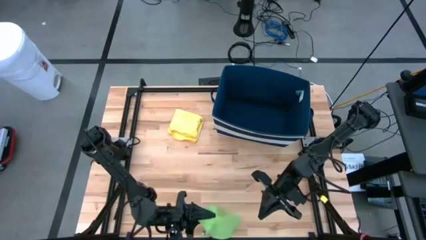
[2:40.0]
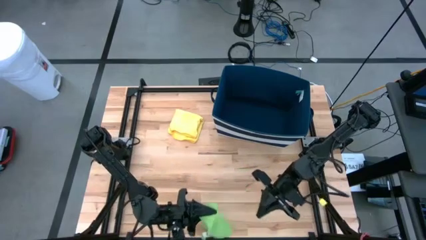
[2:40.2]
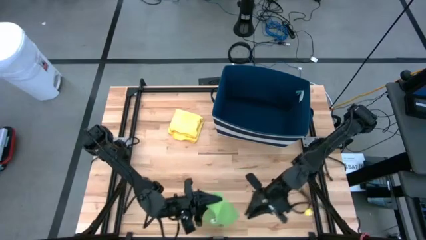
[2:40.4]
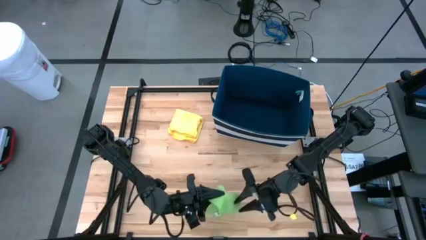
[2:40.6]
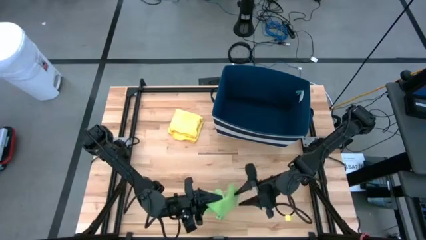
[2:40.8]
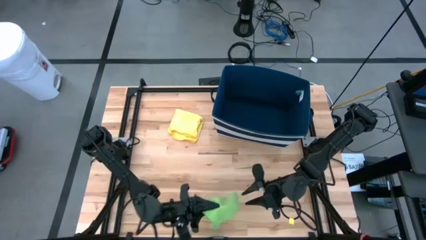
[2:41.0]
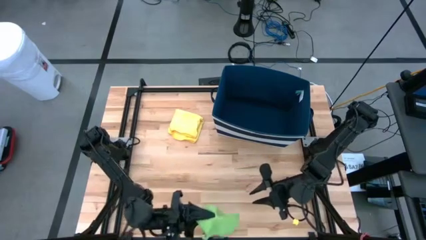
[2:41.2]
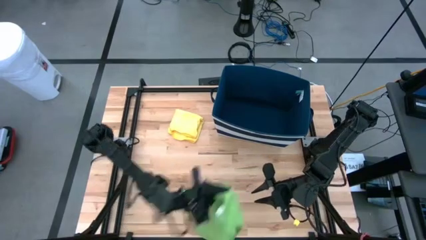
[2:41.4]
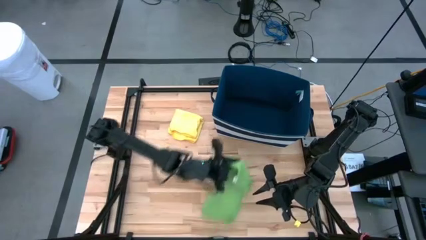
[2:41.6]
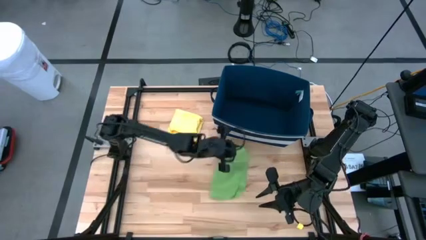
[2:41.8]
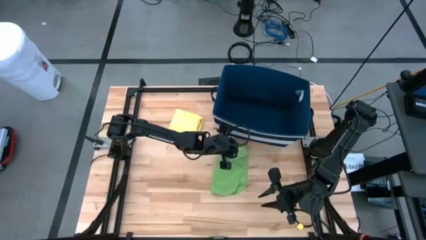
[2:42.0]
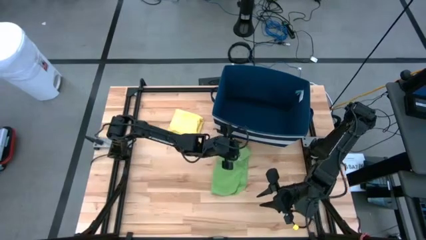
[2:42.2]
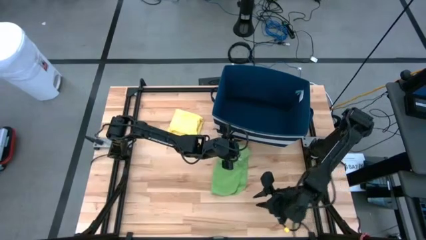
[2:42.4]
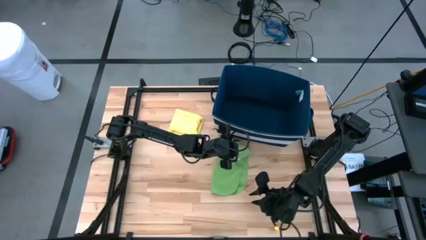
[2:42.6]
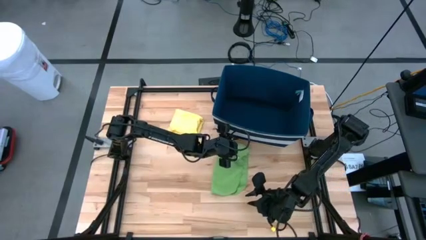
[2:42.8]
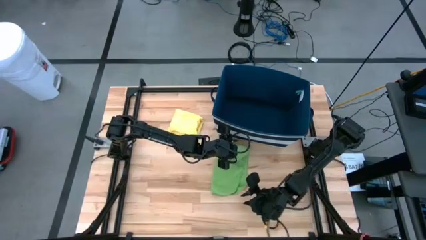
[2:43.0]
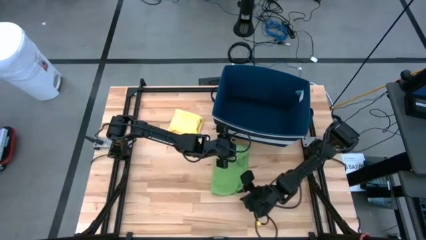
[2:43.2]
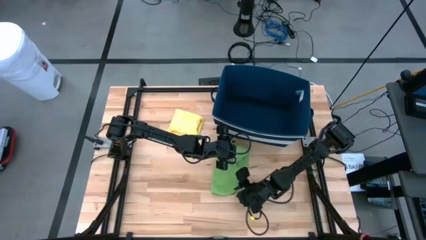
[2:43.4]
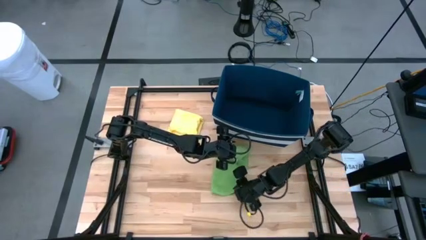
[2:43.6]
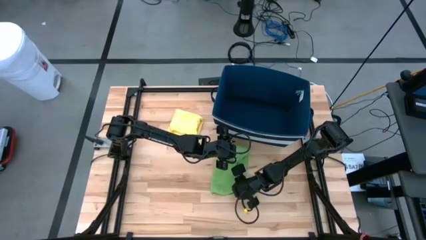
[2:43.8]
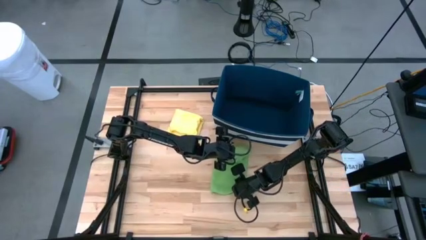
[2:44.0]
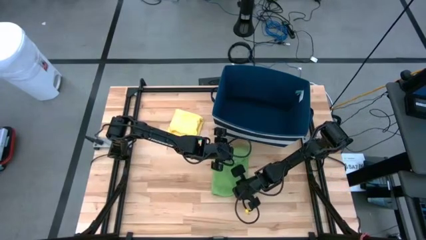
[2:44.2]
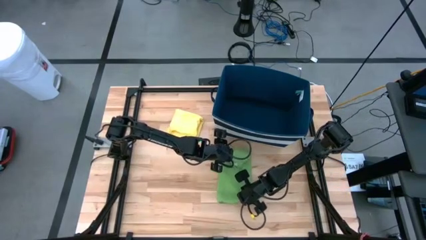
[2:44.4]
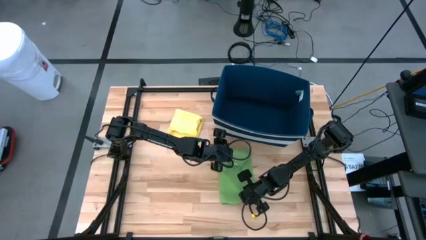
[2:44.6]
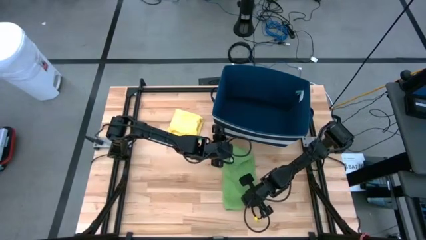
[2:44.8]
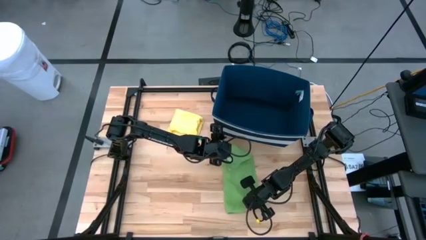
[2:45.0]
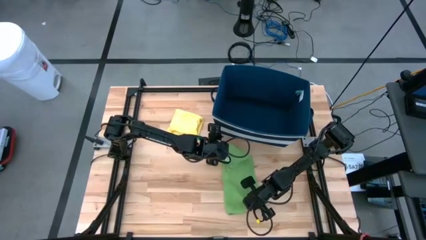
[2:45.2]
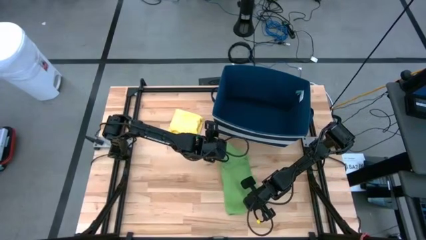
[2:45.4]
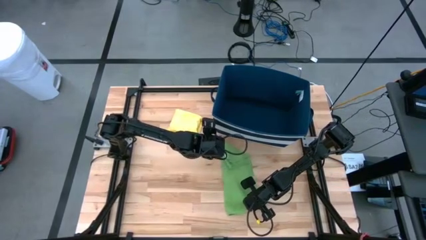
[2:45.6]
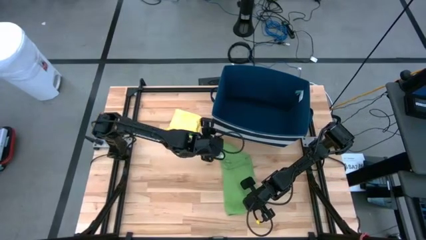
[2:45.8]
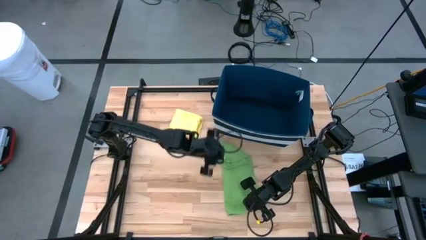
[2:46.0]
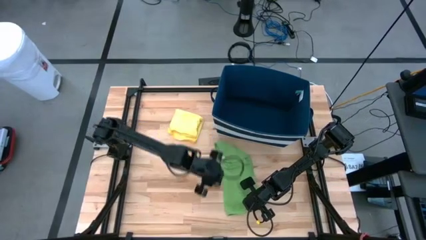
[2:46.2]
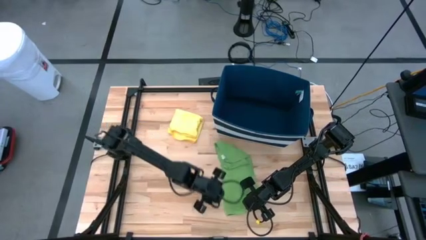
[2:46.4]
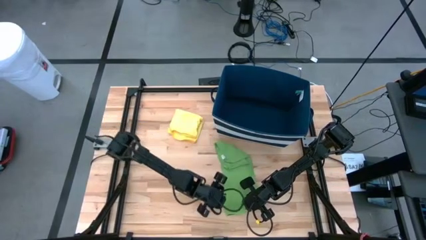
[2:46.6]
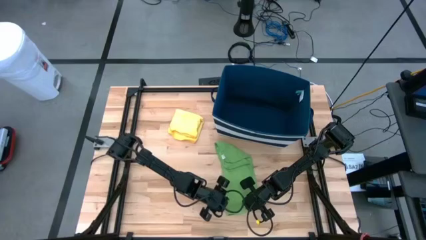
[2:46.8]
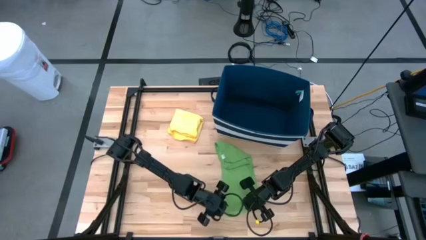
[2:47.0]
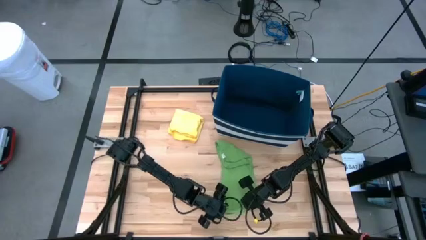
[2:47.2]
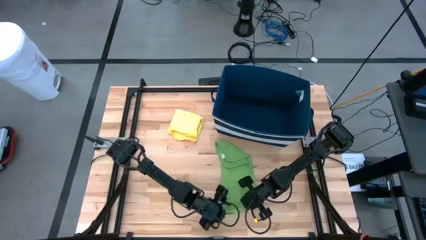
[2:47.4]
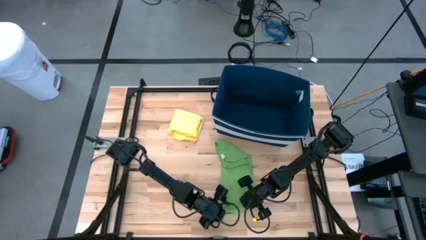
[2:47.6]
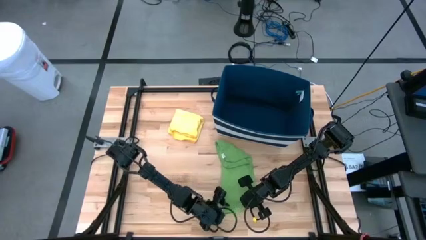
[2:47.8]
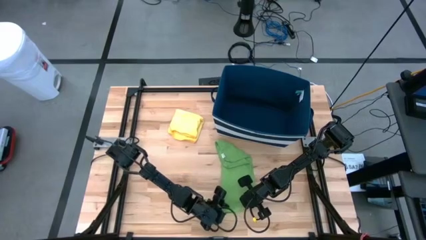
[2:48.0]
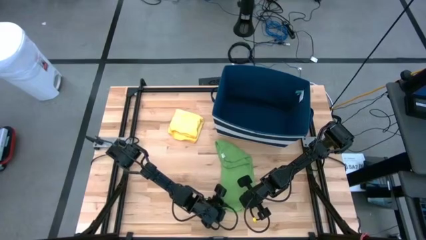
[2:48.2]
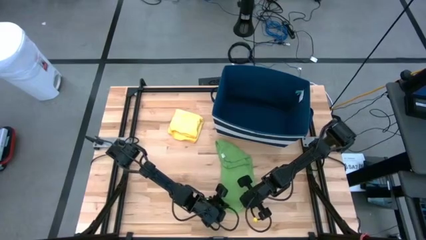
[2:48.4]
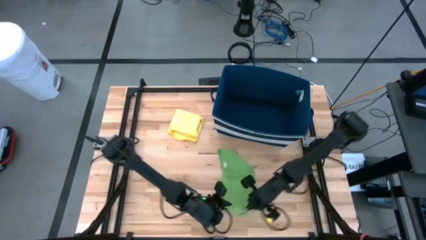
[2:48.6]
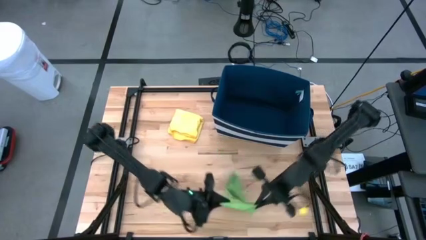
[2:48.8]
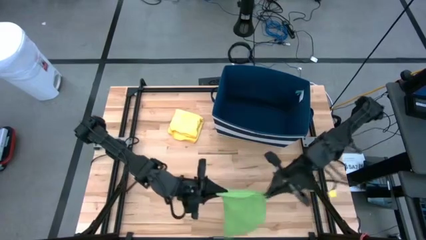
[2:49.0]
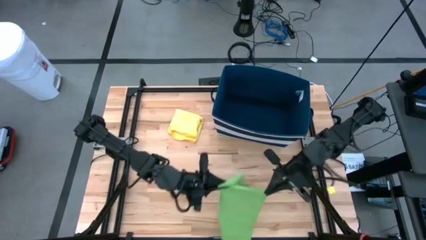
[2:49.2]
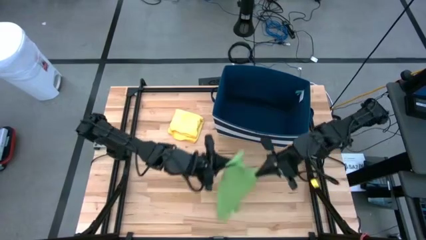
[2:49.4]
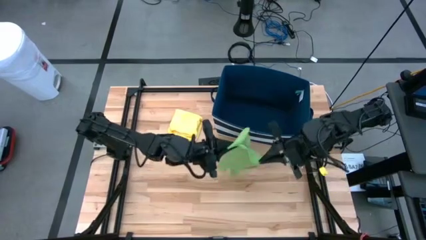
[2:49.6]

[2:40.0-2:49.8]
Task: Fold towel
Fold the green towel

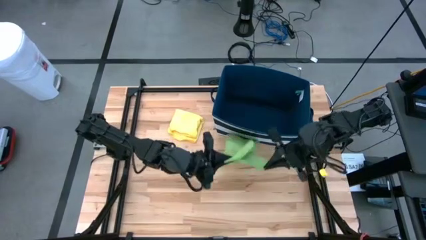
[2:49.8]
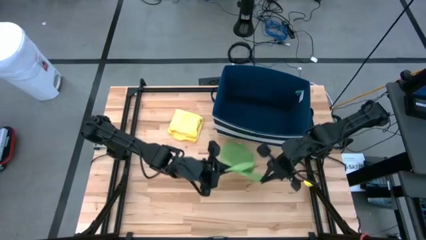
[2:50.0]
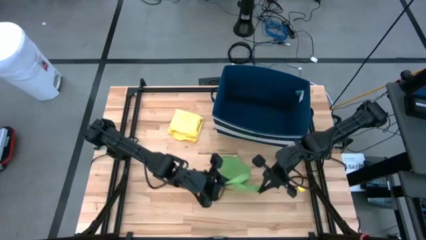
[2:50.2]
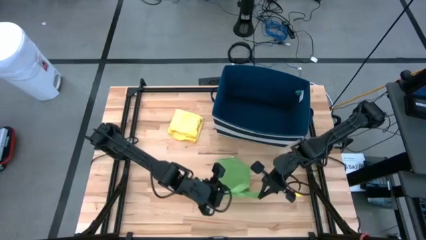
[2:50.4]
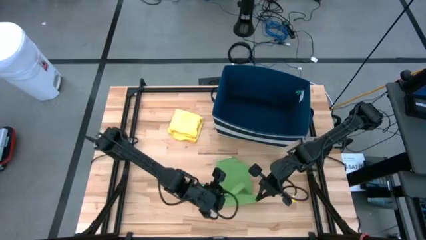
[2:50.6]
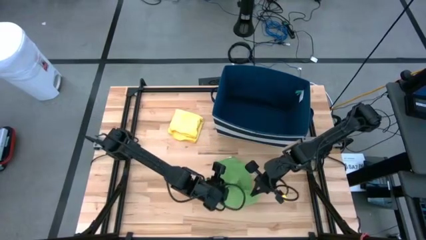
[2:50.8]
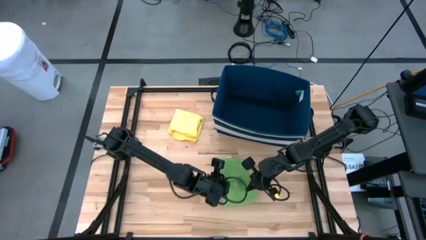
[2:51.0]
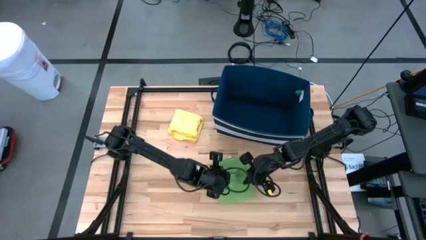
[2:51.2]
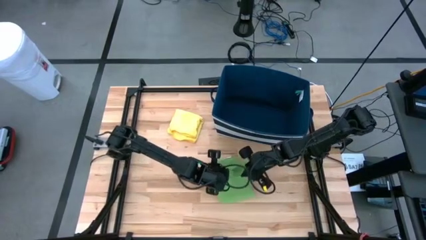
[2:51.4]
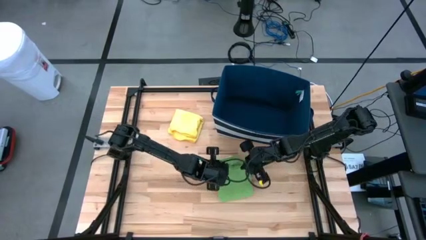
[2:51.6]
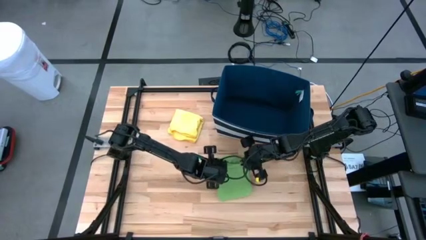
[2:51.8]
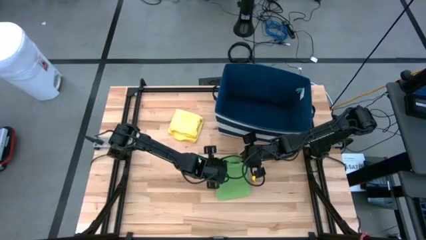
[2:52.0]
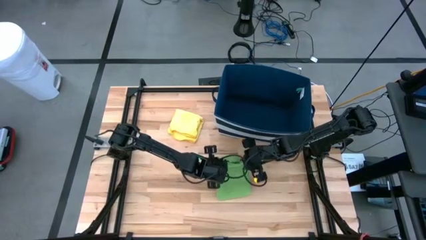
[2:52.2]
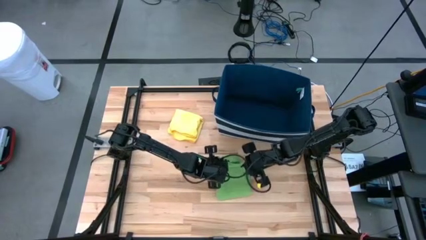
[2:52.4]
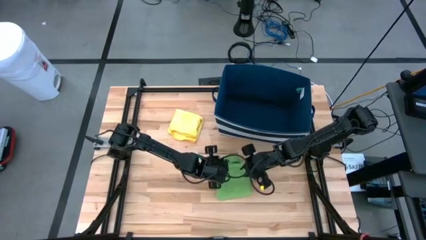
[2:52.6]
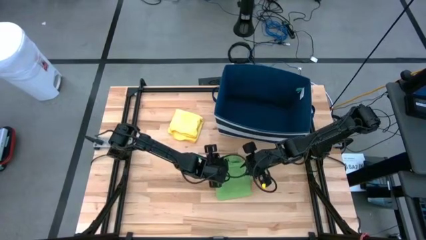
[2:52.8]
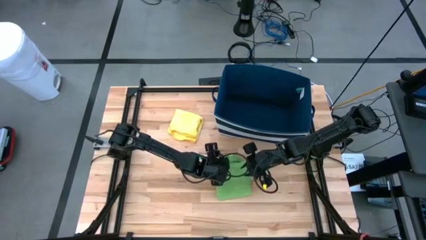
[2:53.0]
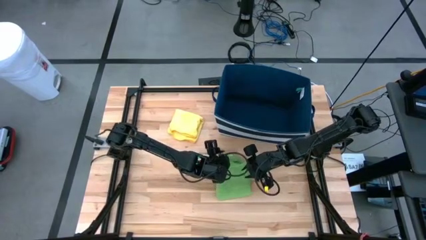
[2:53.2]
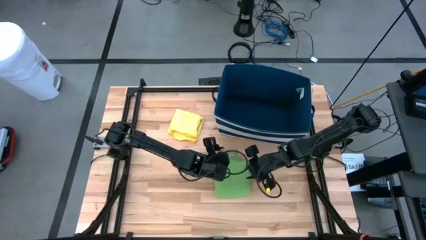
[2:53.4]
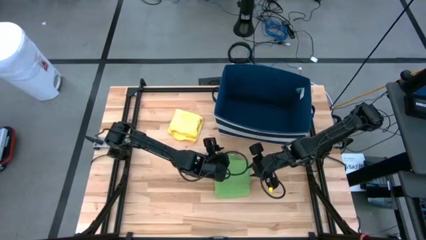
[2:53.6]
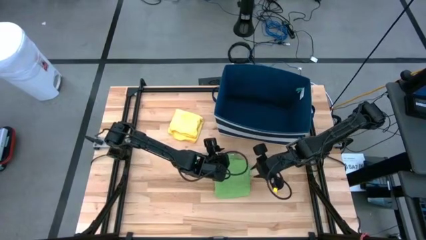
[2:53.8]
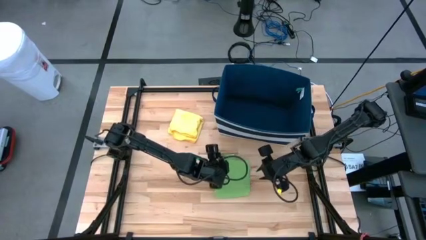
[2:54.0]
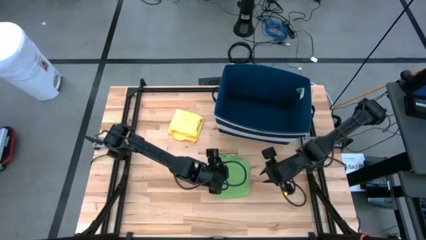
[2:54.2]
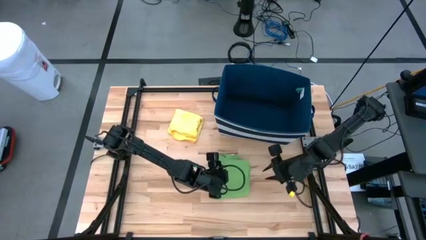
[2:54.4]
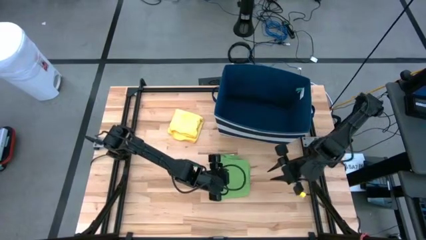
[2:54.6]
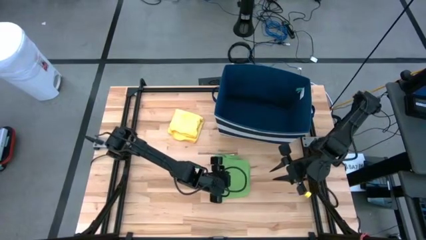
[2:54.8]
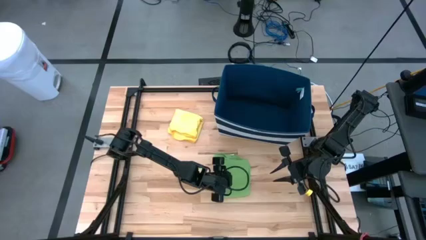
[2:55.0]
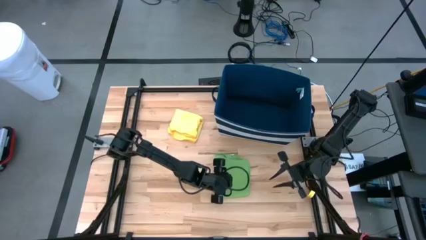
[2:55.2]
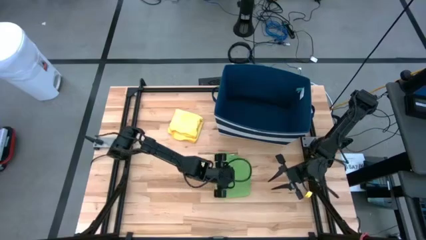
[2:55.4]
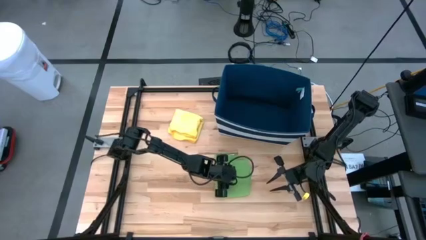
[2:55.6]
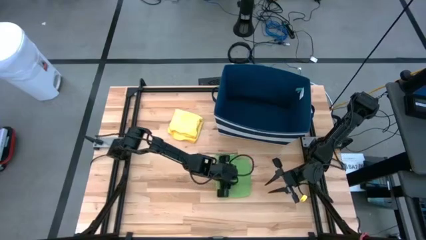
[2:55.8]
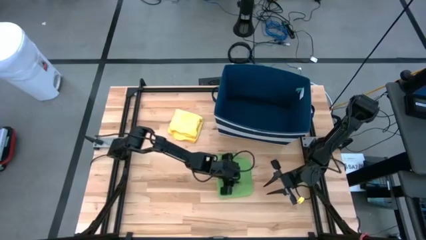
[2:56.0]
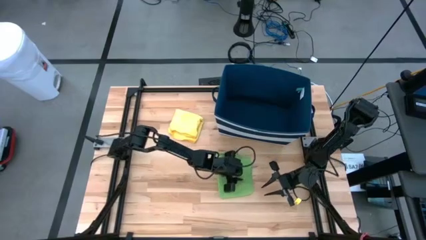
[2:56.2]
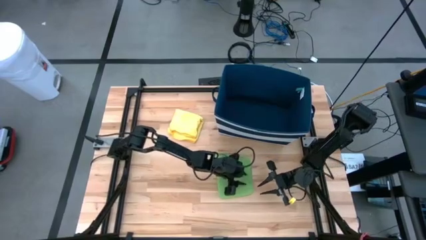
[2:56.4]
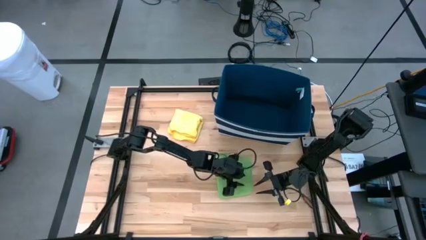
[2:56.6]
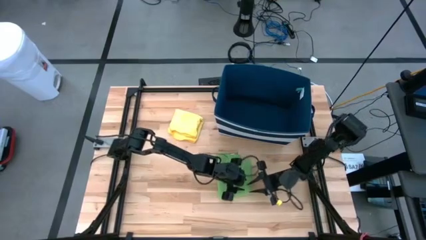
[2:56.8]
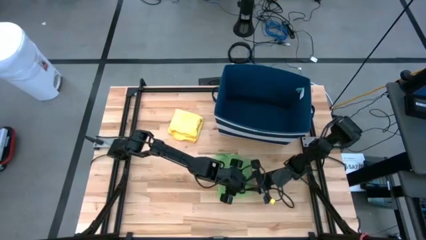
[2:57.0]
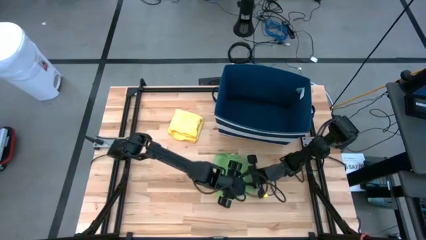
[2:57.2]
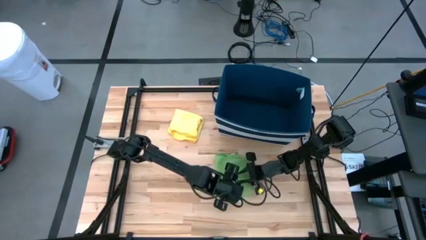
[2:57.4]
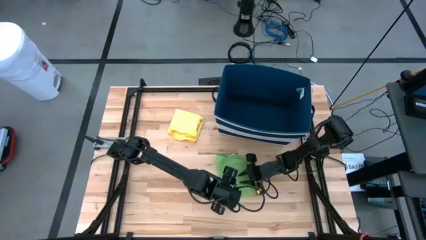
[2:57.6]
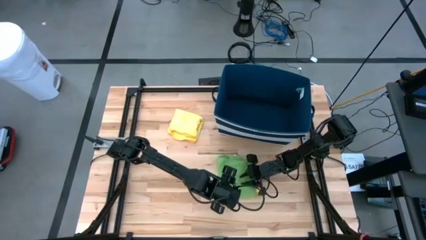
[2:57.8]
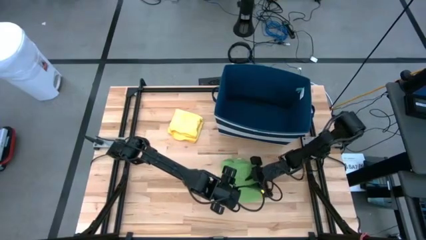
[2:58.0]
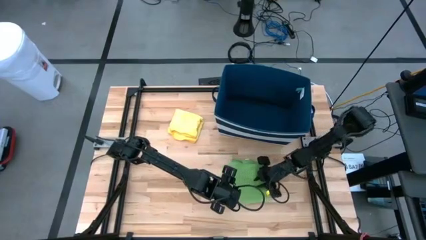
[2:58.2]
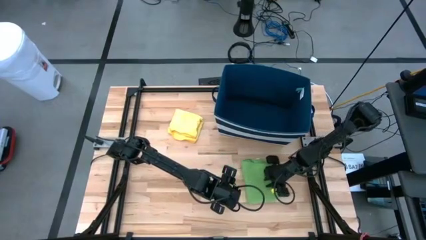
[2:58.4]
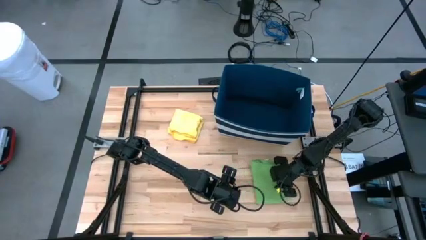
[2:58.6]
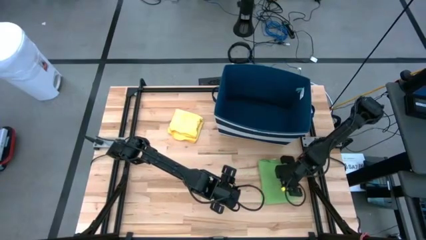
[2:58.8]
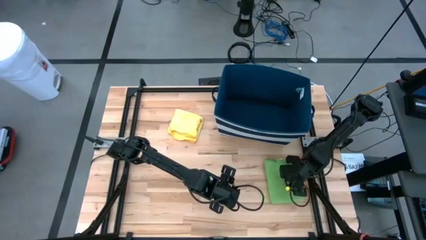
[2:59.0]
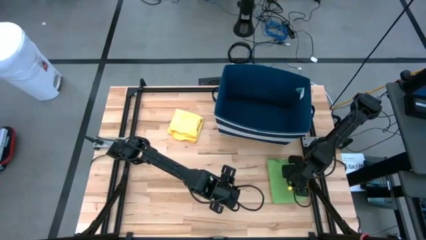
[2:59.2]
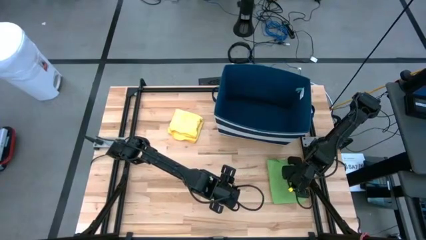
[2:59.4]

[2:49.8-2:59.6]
Fold the green towel
